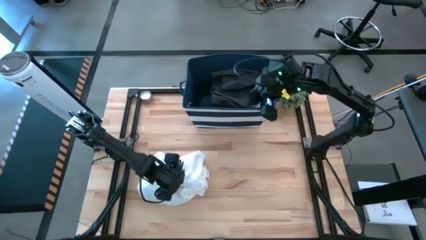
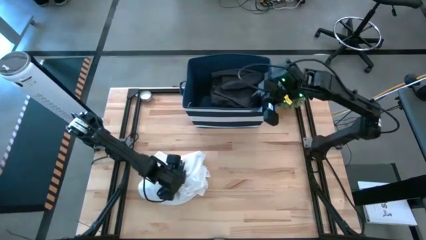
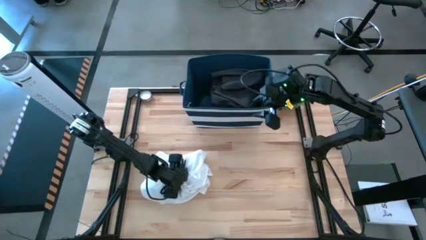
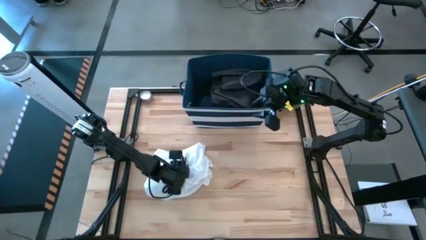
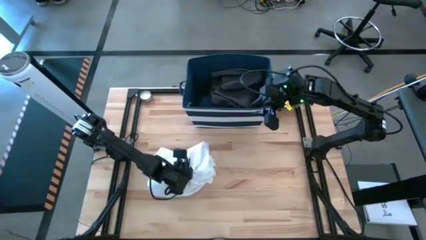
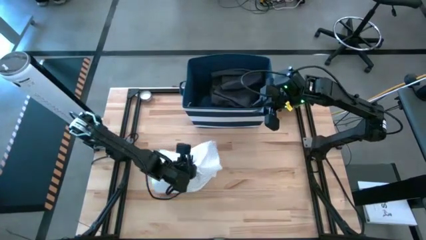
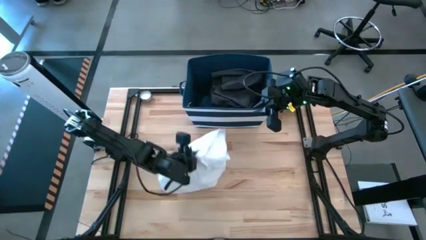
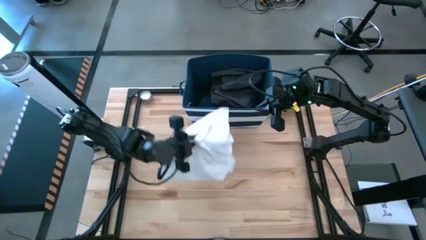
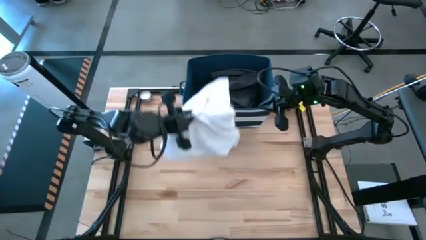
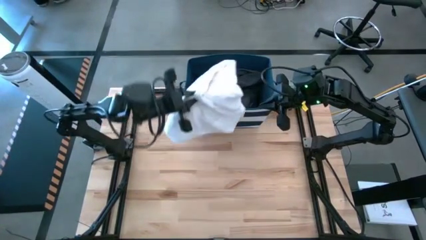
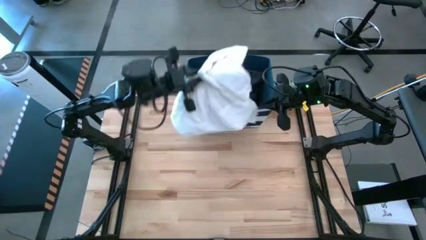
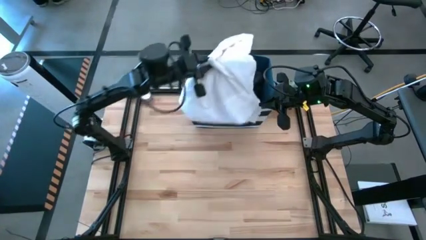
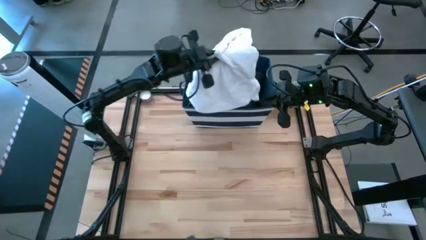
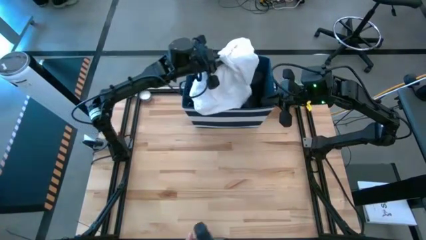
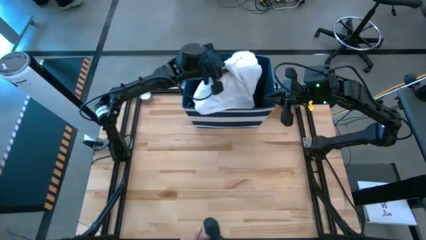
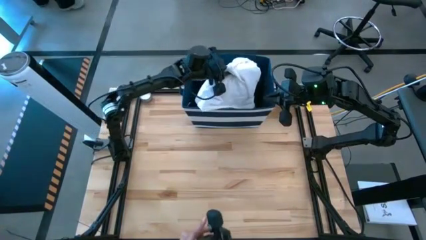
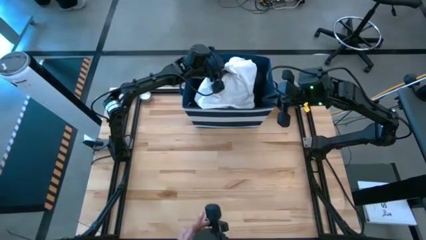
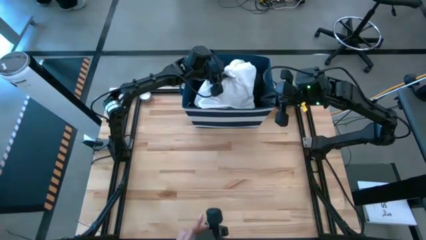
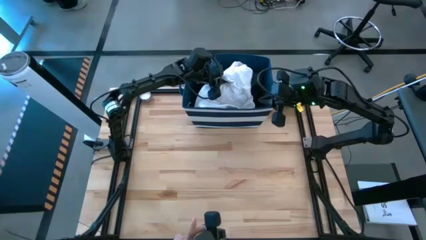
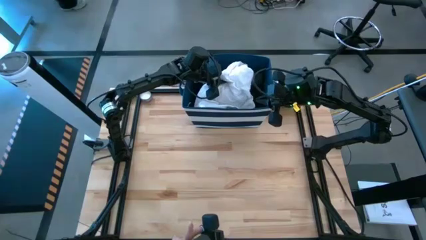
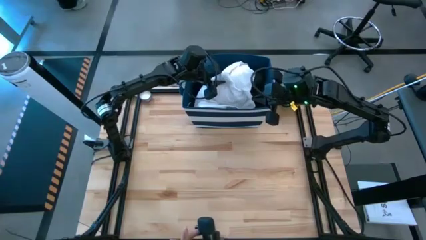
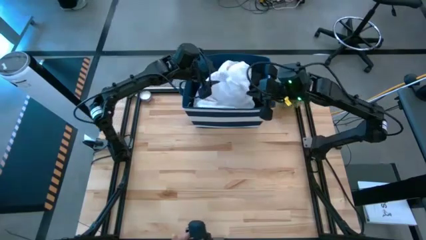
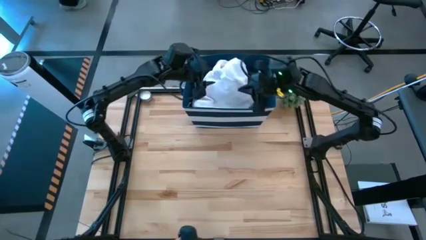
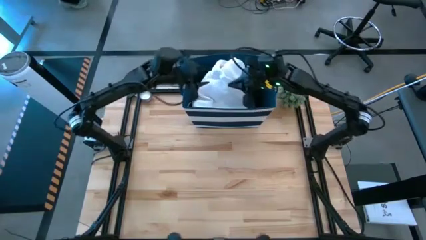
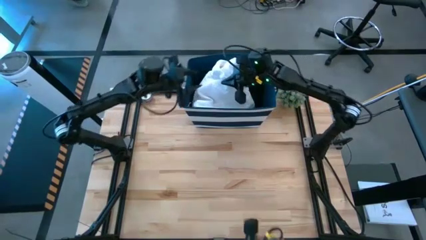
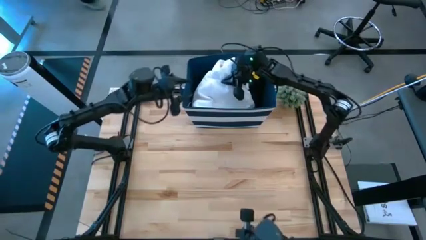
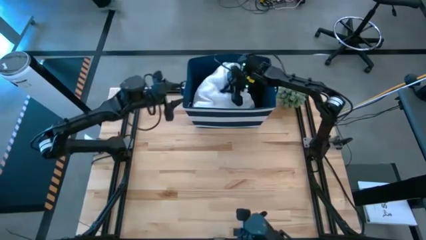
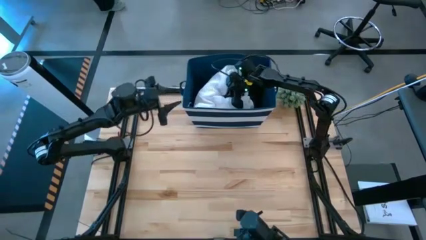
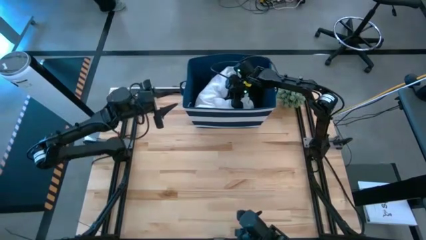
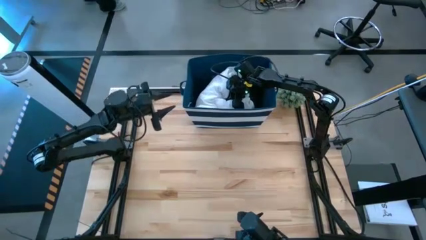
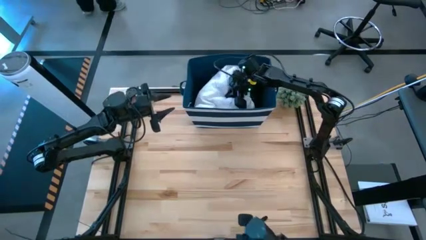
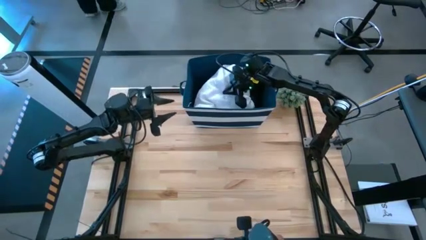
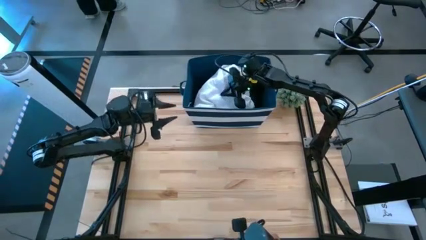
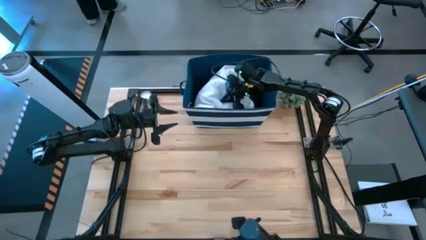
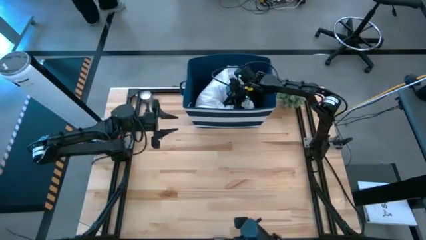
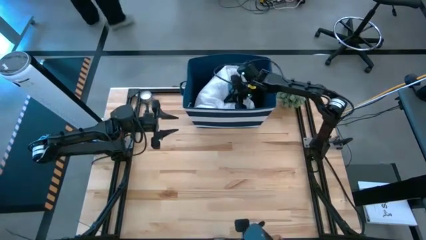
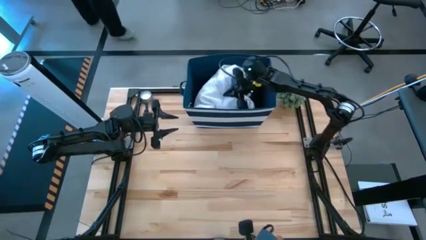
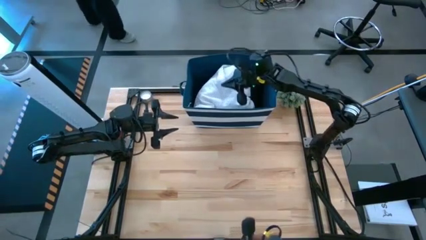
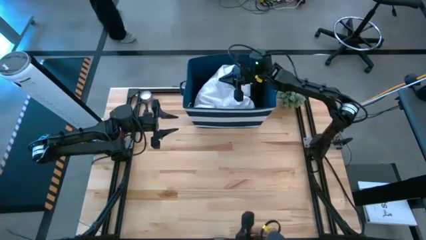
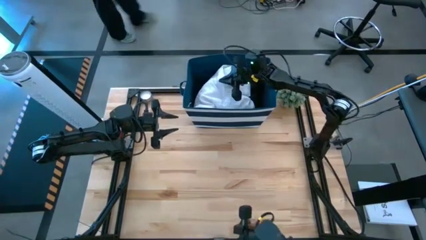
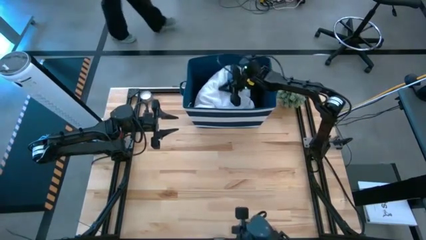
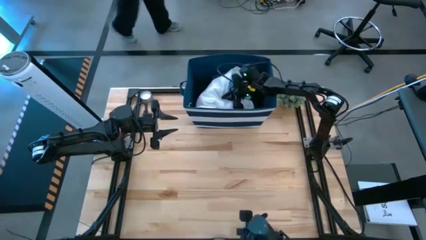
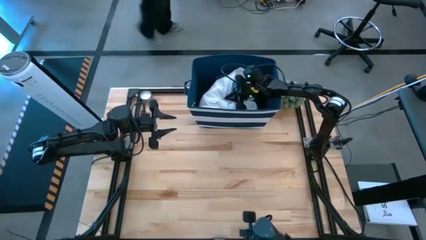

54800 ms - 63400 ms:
Task: Sort clothes
Put the white shirt into the blue bin

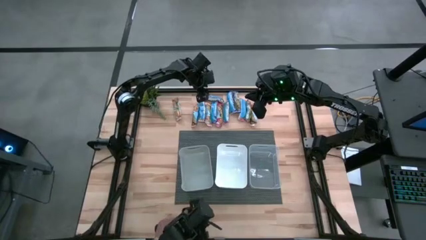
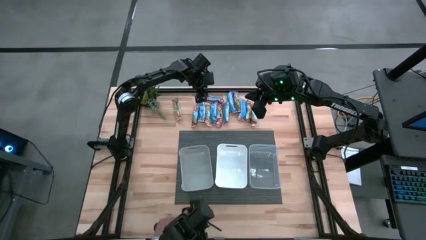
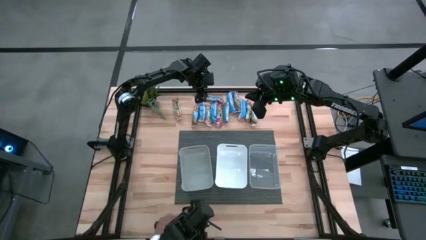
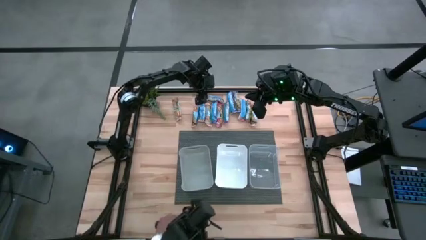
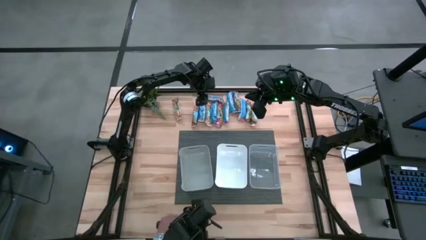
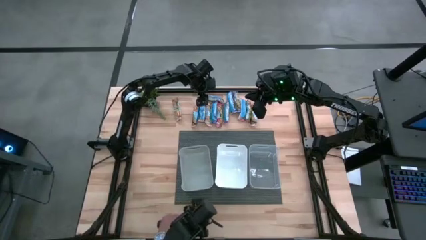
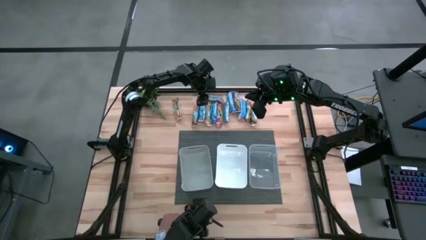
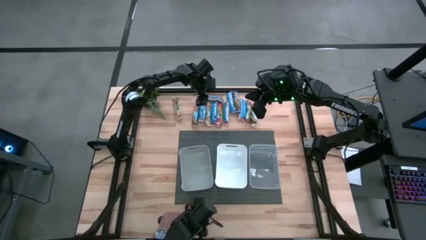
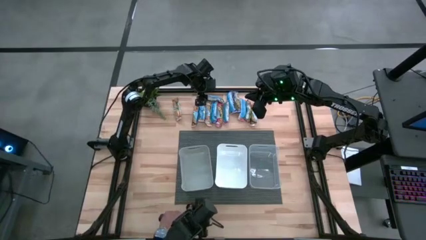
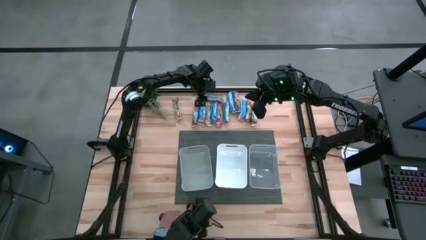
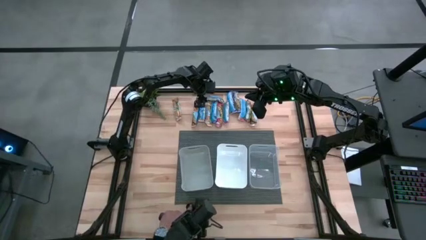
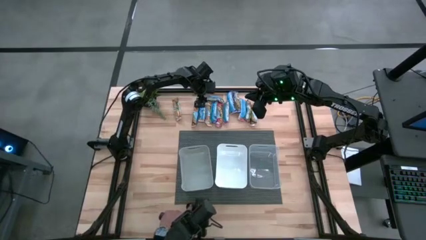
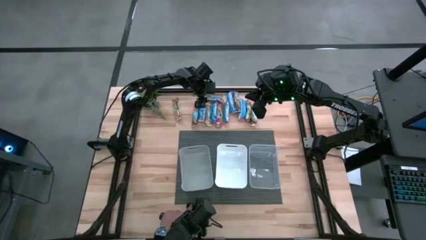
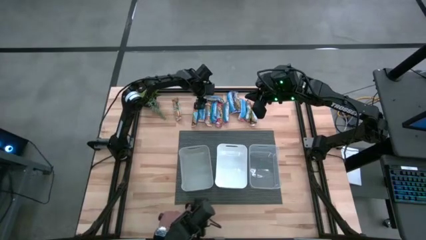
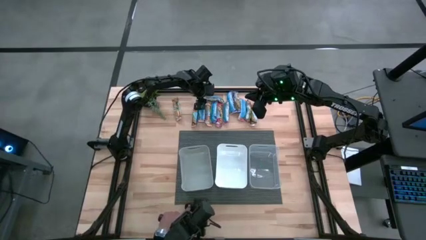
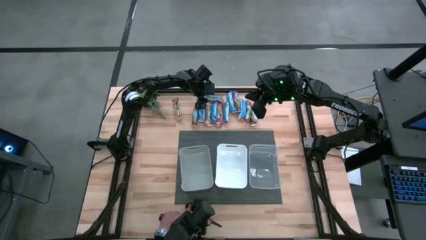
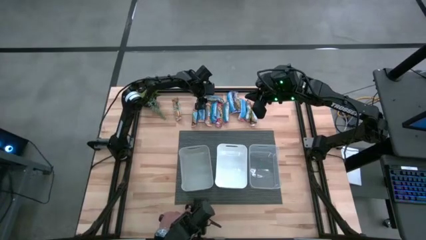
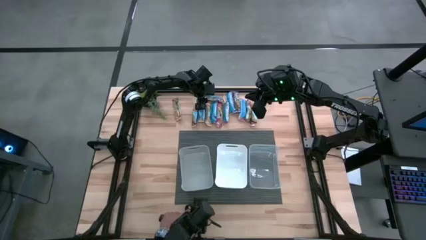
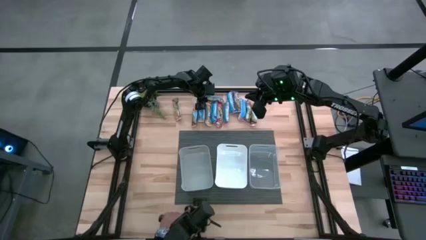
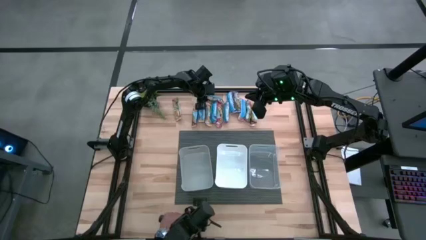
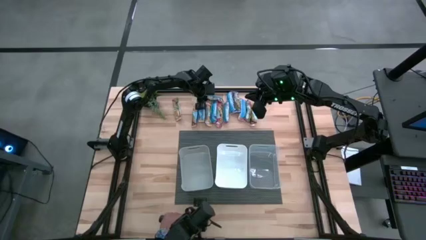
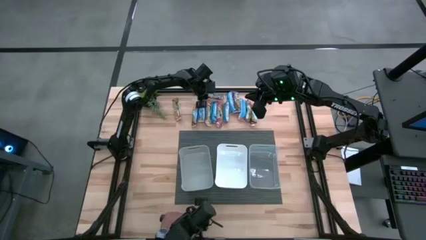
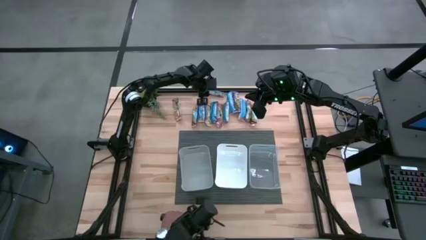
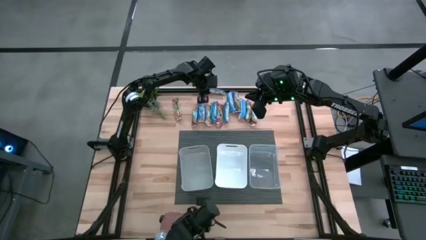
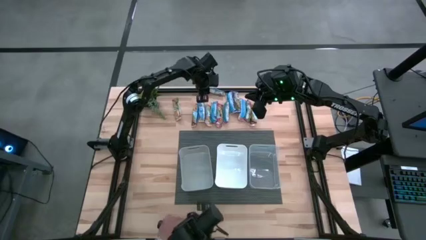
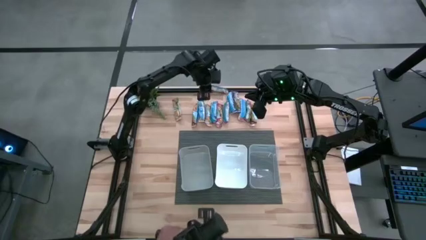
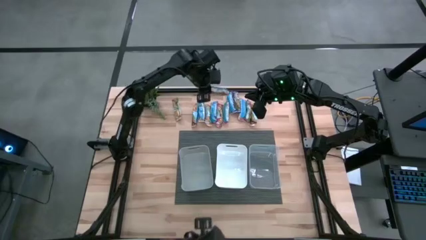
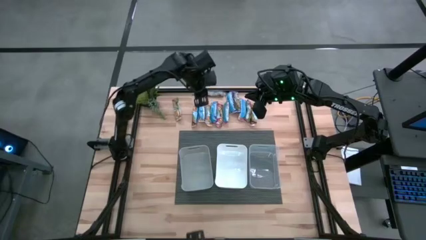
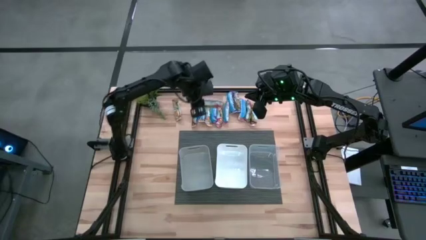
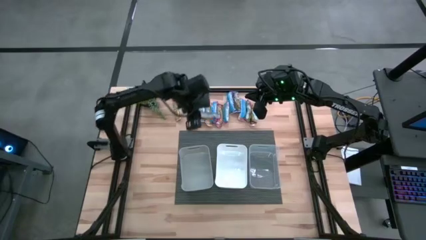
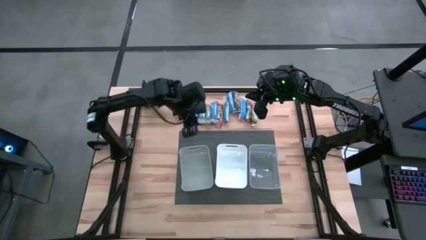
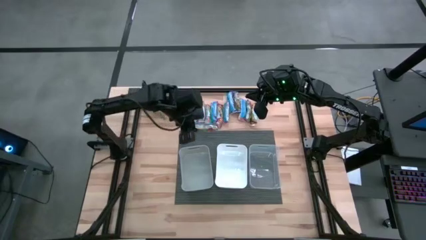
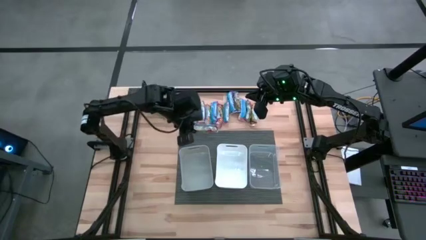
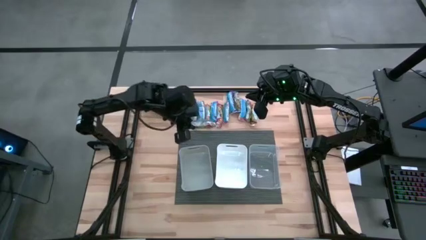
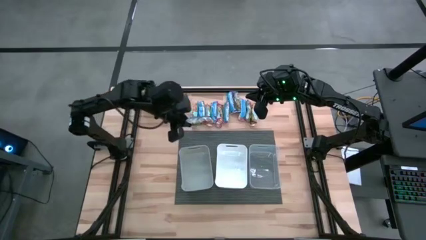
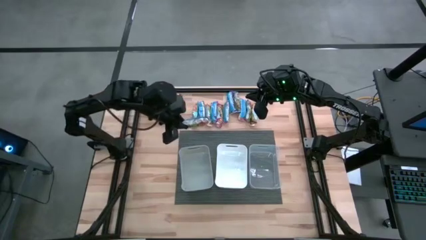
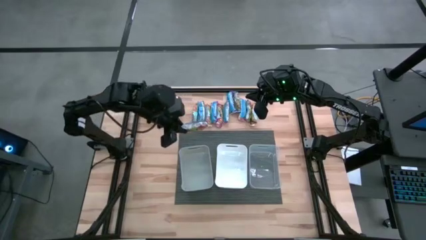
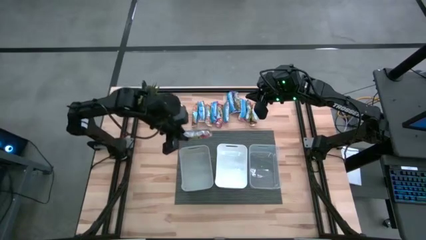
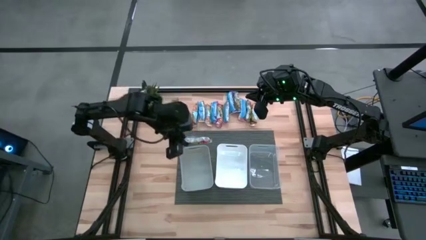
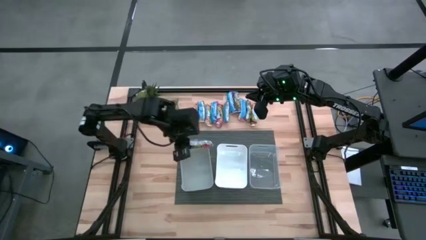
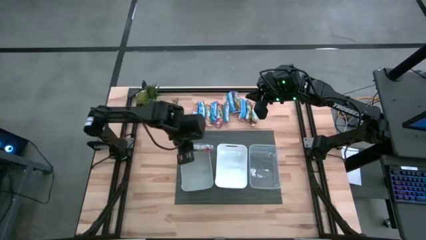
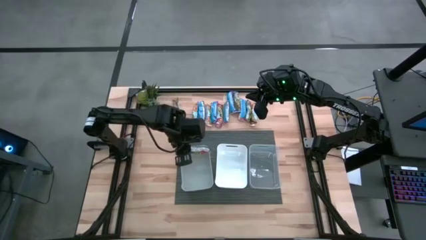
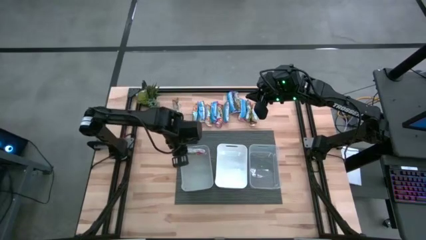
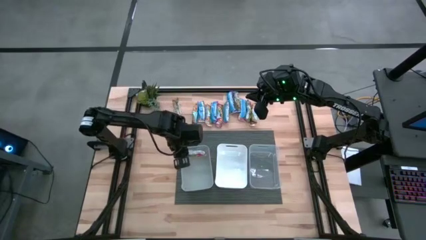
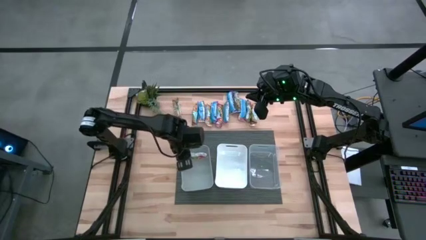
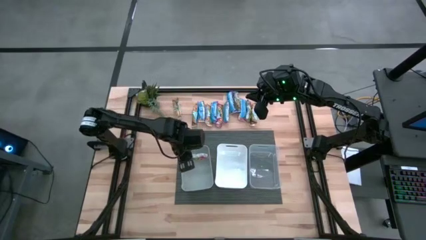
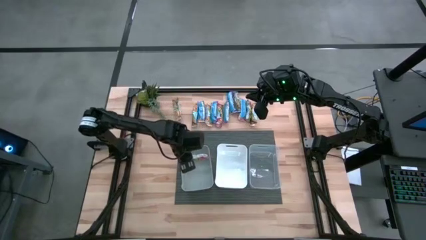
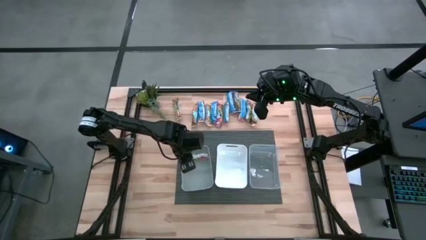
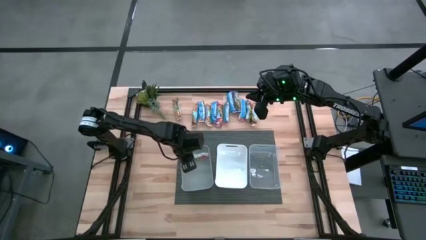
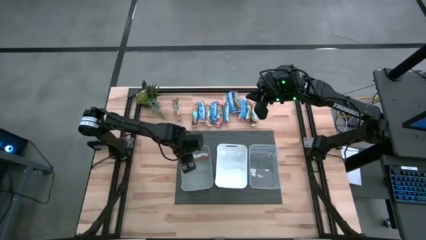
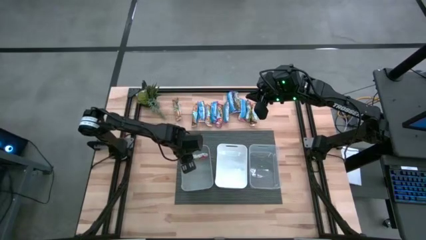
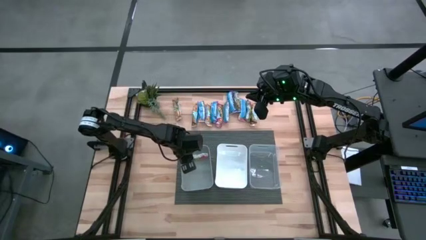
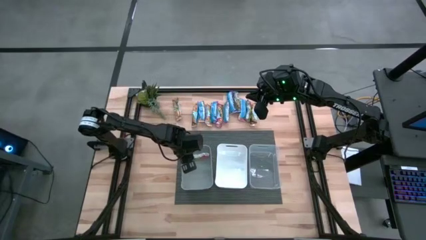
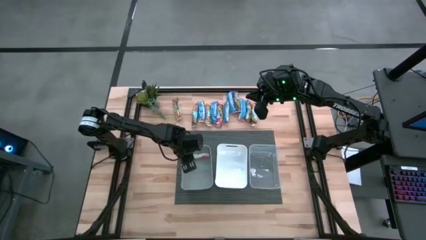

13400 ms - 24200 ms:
Task: Pick and place Granola Bars by type
Put the red granola bar into the gray bin
